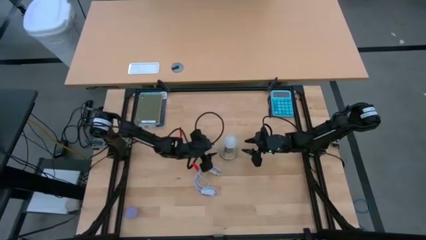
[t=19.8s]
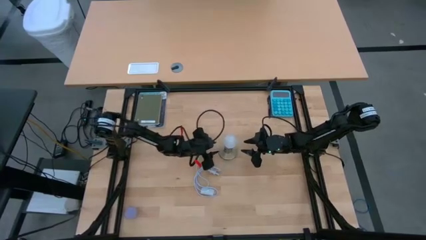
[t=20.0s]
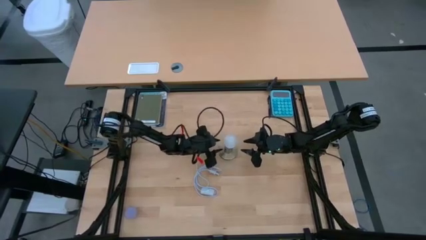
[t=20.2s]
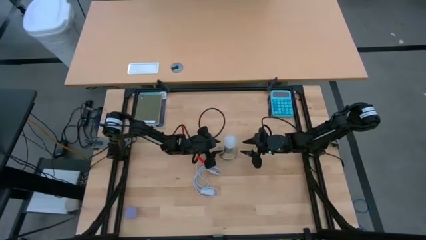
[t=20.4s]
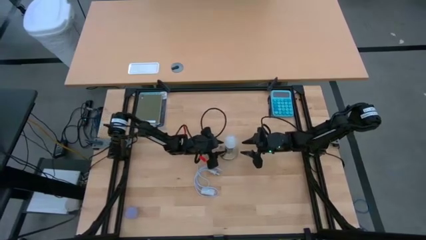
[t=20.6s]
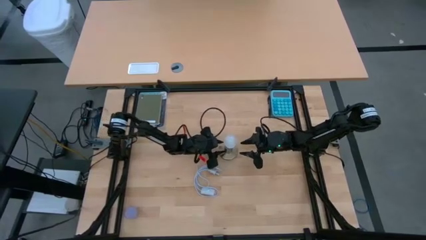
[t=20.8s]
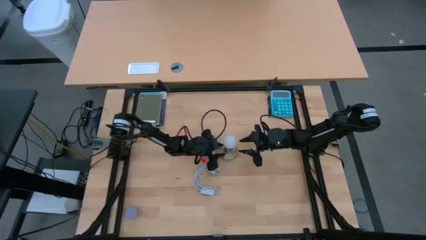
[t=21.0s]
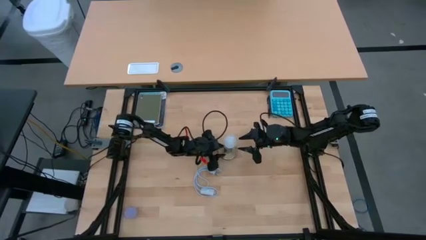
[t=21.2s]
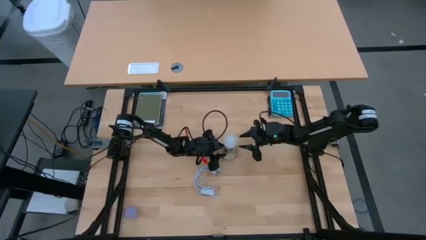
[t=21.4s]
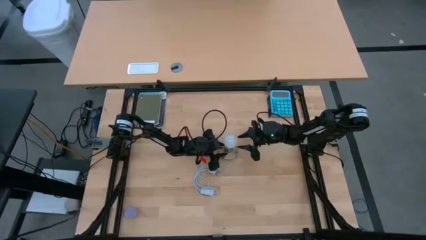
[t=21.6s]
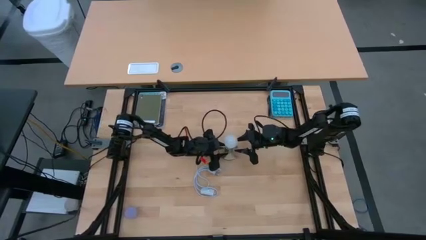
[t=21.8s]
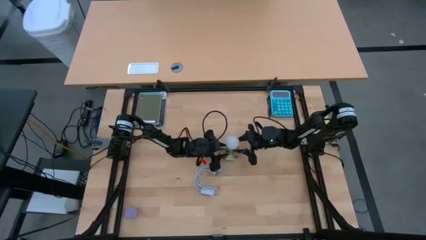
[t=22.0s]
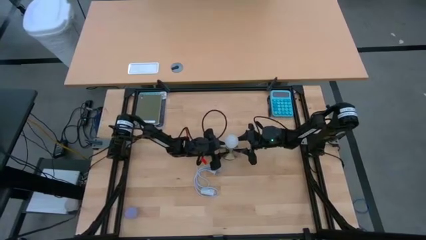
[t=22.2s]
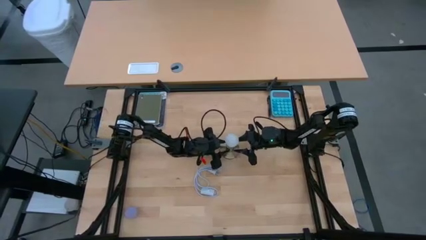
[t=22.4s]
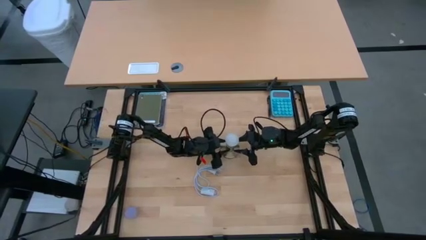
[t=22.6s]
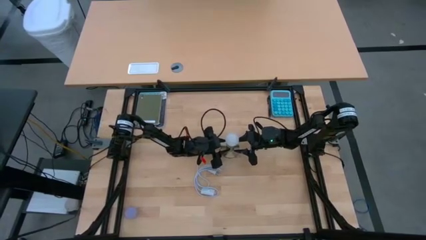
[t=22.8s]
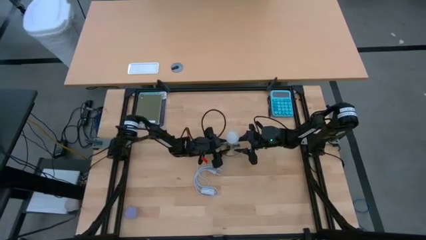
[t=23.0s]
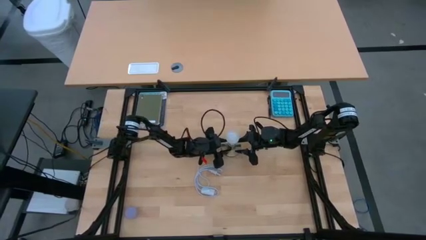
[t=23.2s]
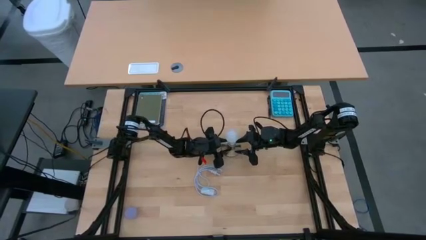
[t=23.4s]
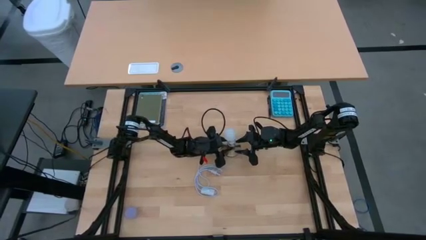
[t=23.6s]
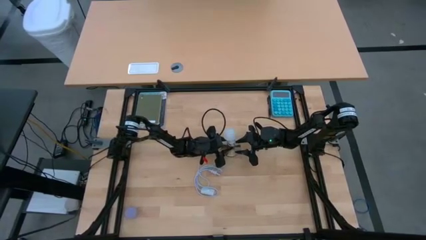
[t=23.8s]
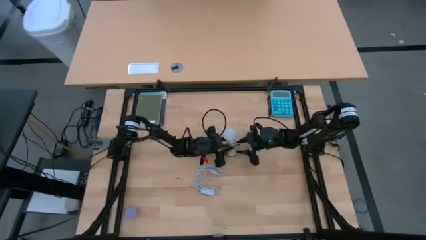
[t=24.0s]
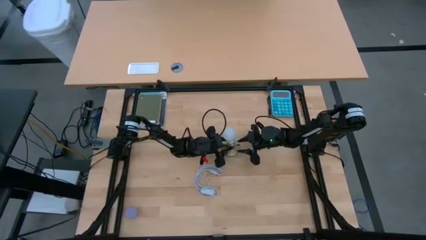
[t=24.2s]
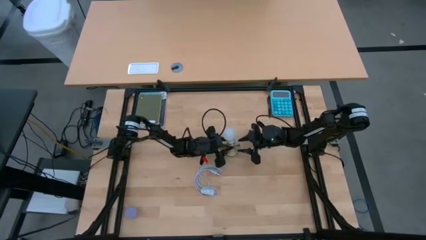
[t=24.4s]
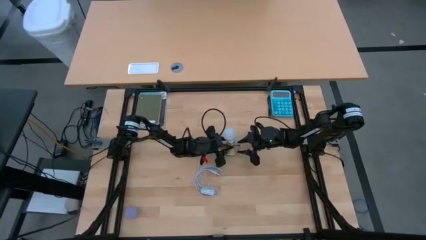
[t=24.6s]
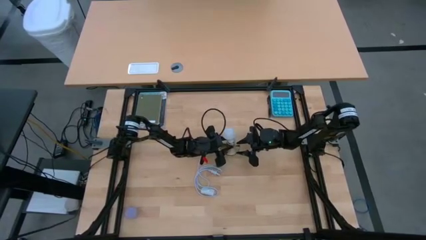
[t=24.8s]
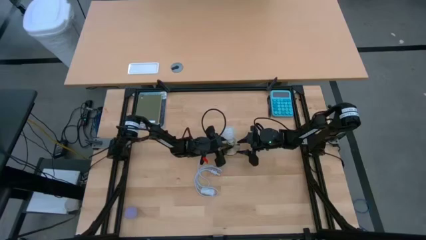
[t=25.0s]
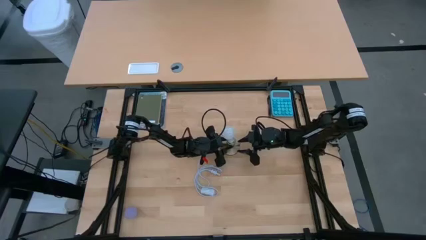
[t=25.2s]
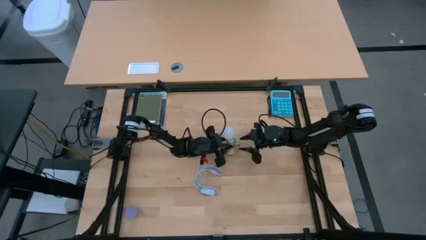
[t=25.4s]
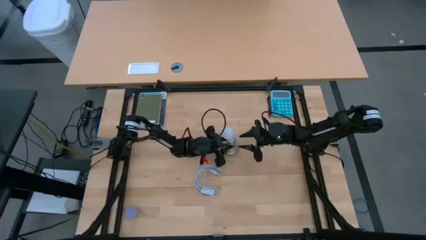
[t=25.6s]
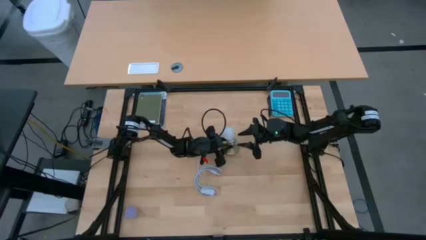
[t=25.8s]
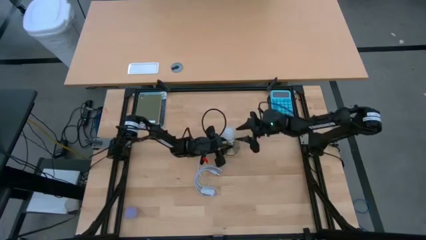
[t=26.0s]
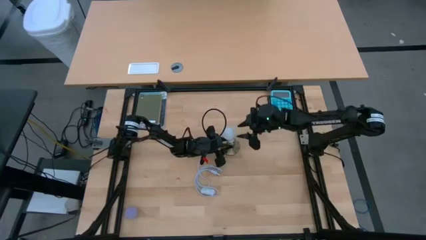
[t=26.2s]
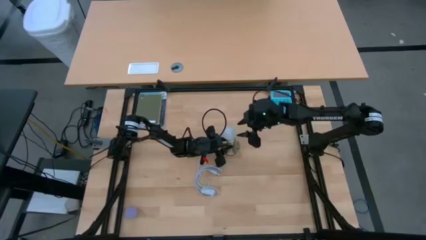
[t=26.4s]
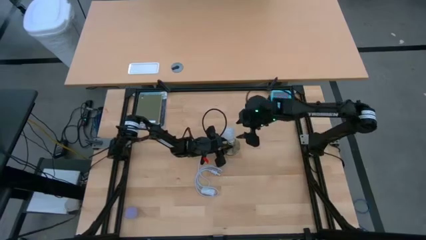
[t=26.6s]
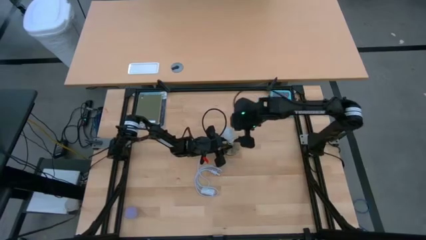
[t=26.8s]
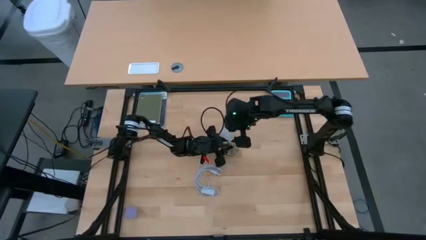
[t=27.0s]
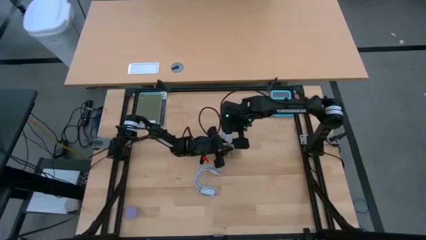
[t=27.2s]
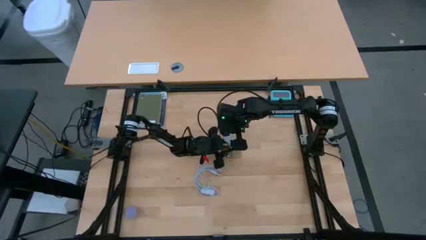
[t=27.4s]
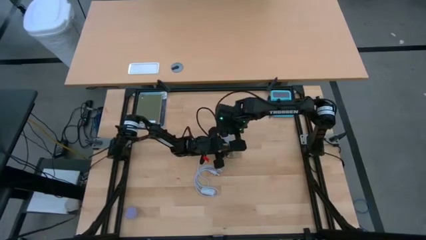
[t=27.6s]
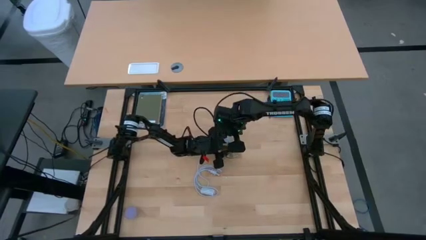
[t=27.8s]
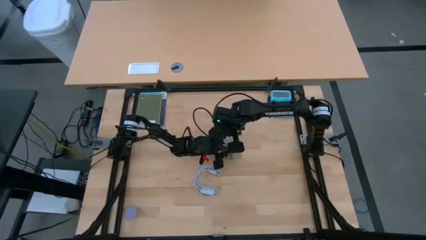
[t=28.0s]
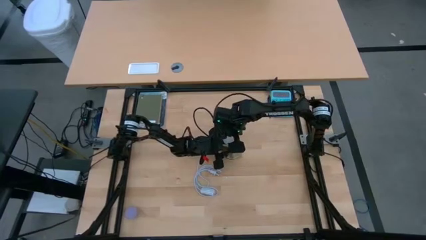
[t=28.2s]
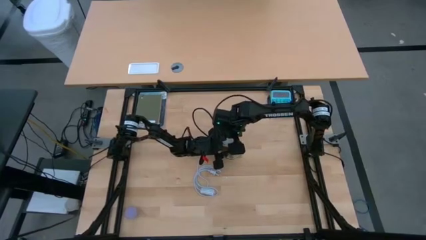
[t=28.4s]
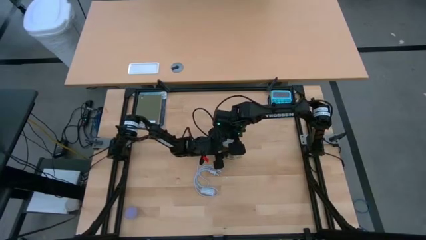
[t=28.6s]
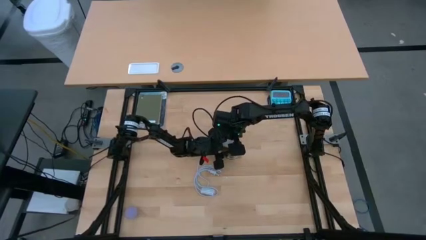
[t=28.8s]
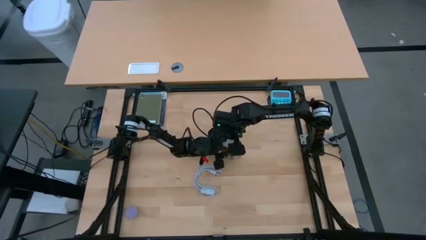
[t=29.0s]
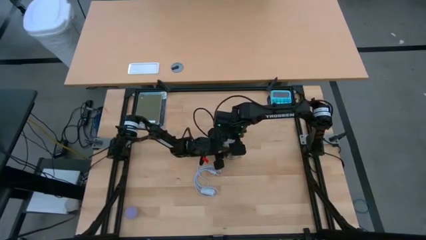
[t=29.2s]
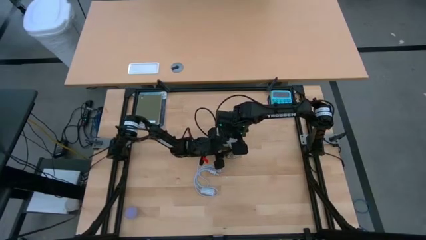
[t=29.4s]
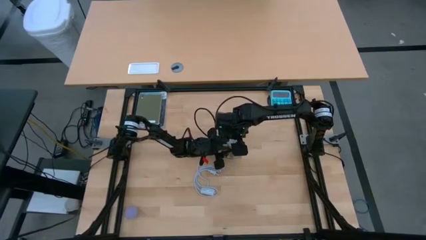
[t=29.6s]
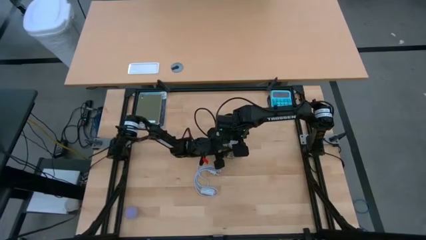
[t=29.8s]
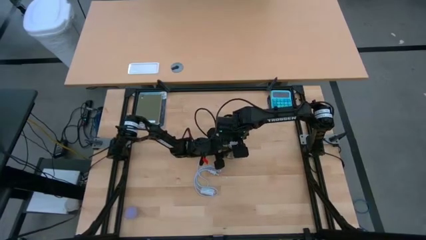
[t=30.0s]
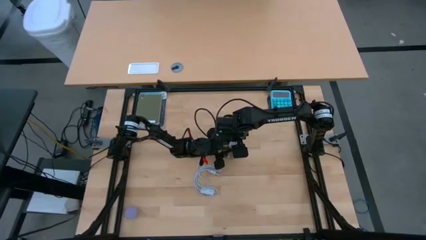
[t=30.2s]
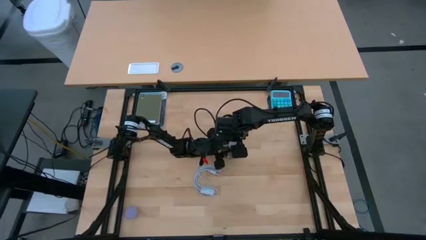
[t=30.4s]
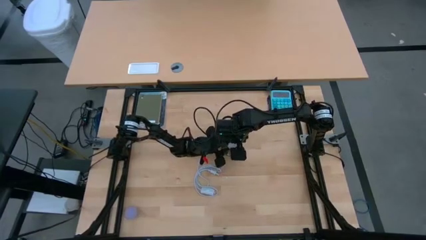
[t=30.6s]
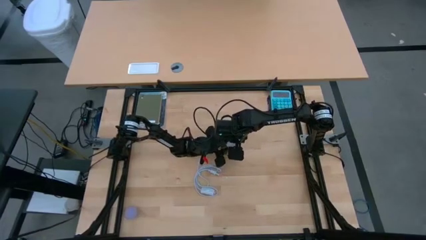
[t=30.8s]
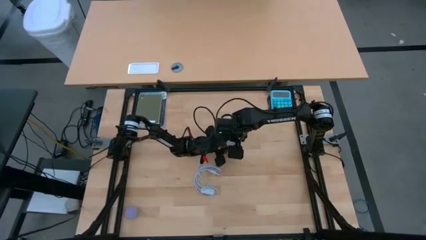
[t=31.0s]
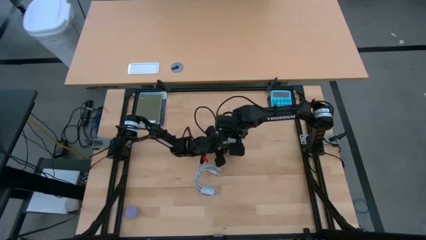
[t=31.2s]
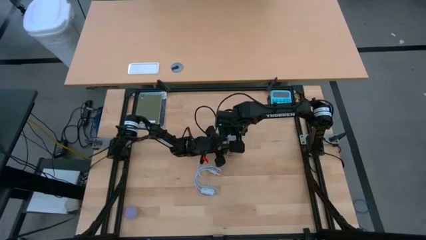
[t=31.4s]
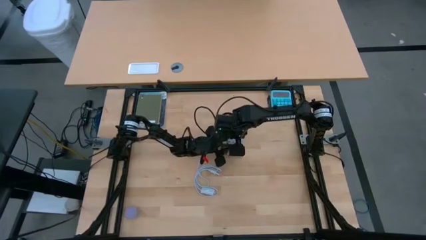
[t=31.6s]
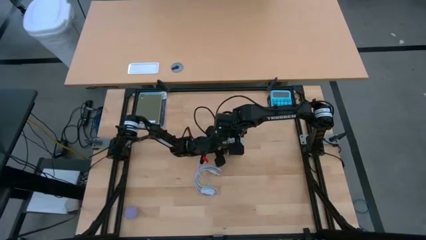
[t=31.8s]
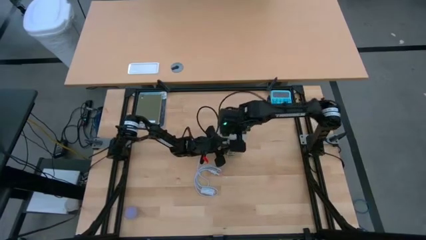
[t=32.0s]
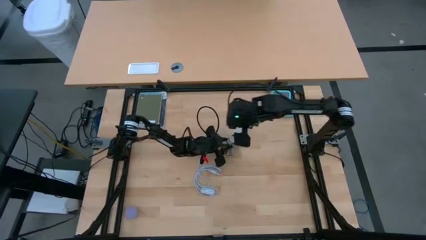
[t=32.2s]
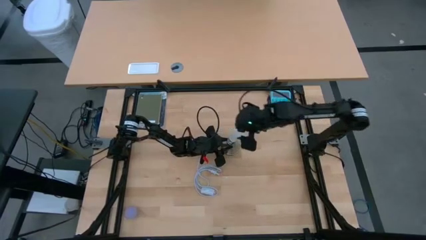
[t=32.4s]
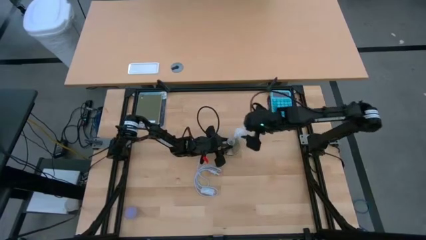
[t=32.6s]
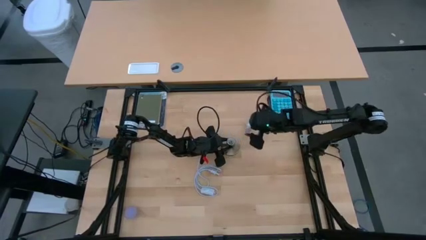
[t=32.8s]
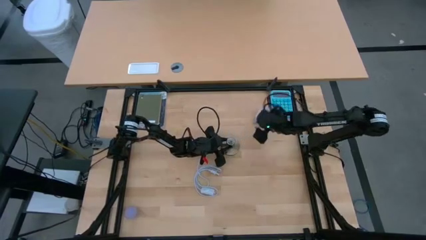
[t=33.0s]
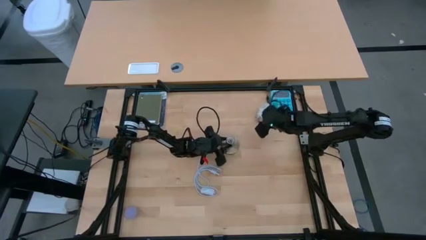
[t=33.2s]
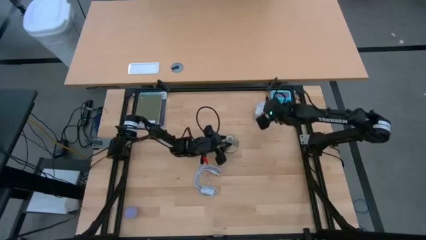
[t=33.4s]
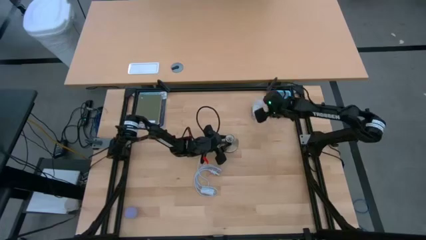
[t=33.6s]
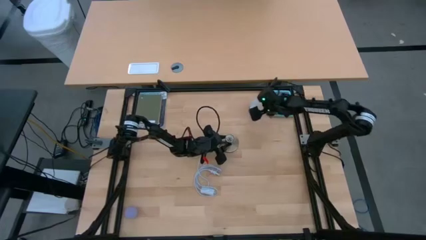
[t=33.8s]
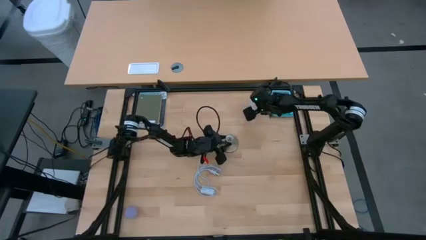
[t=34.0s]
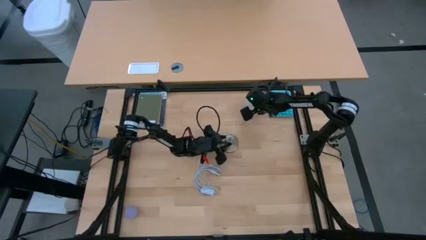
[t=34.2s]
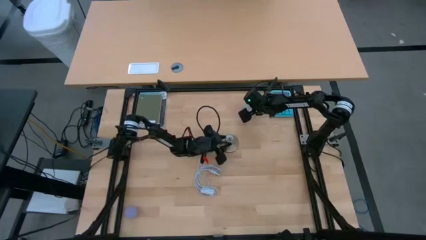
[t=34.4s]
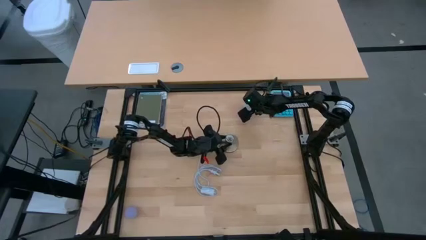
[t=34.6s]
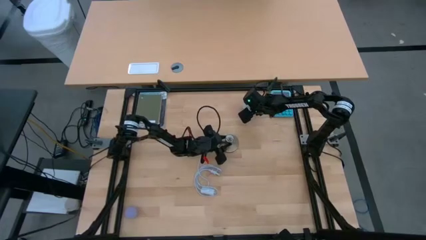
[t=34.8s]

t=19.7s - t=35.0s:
Task: Screw lightbulb
Insert the white lightbulb into the silver lamp
